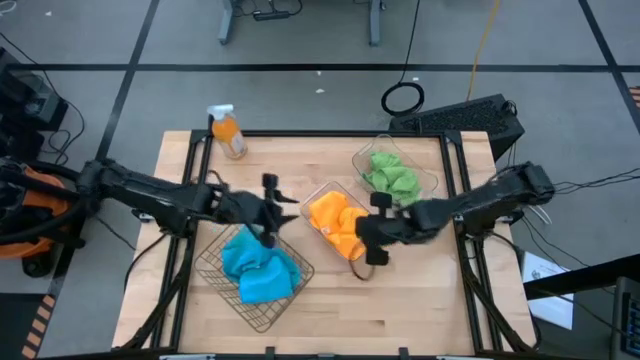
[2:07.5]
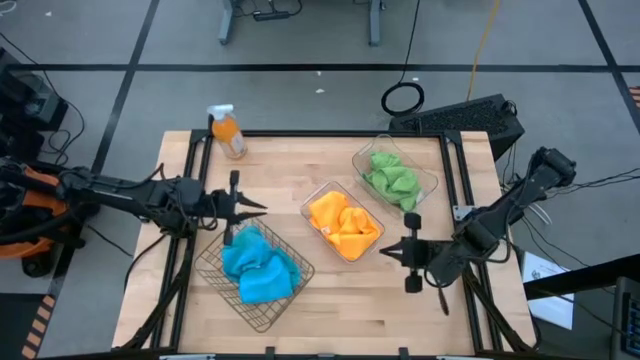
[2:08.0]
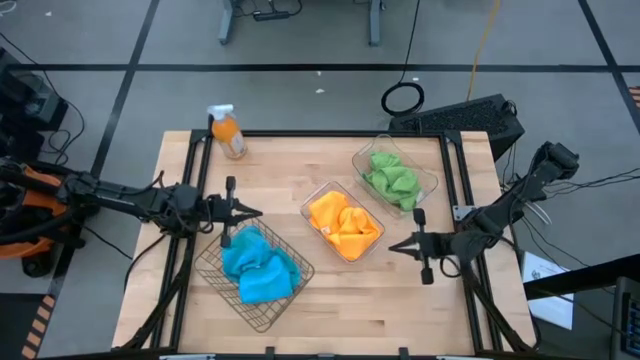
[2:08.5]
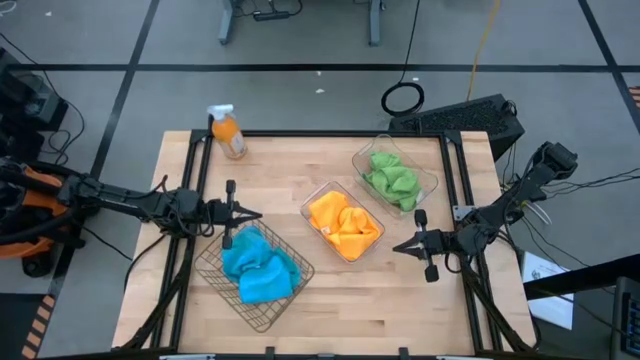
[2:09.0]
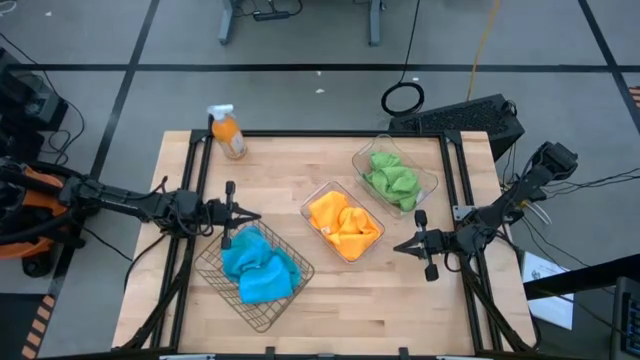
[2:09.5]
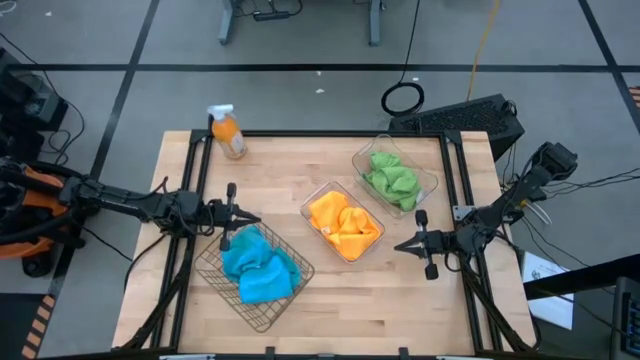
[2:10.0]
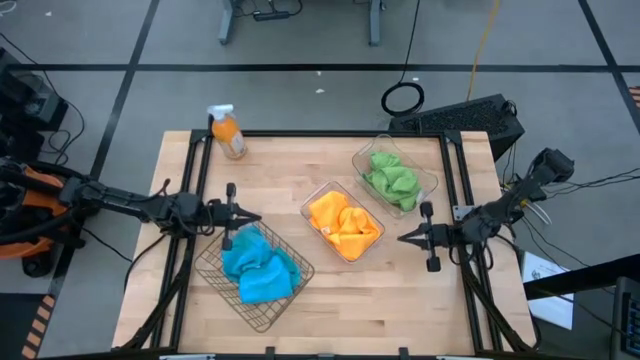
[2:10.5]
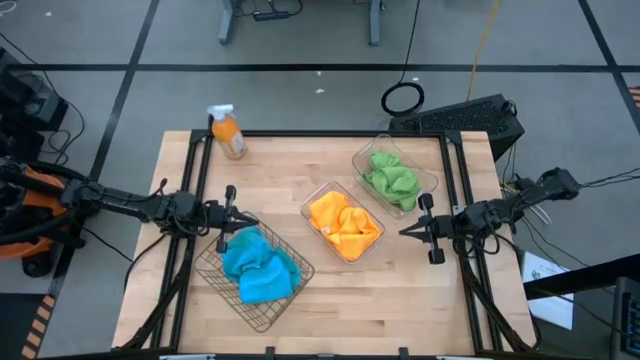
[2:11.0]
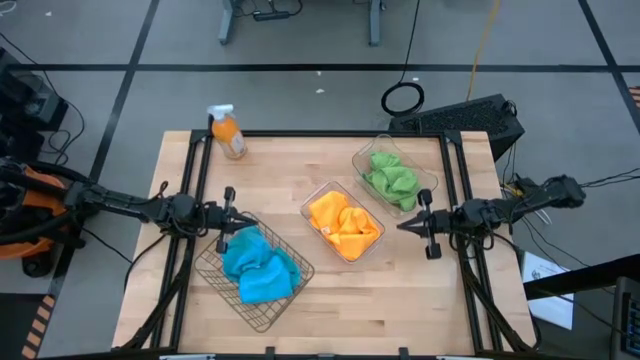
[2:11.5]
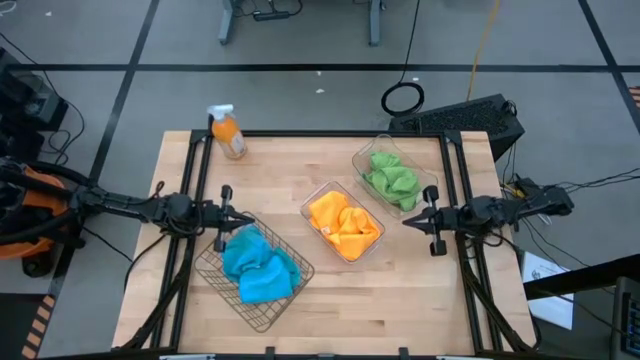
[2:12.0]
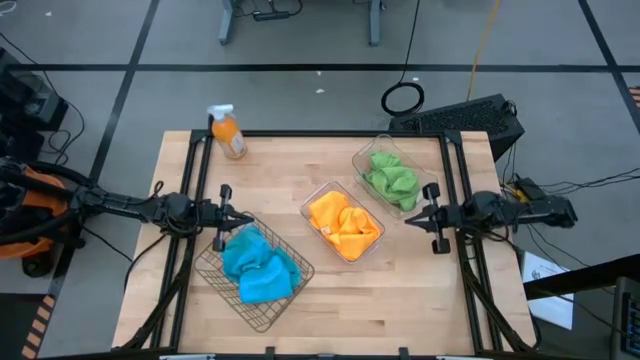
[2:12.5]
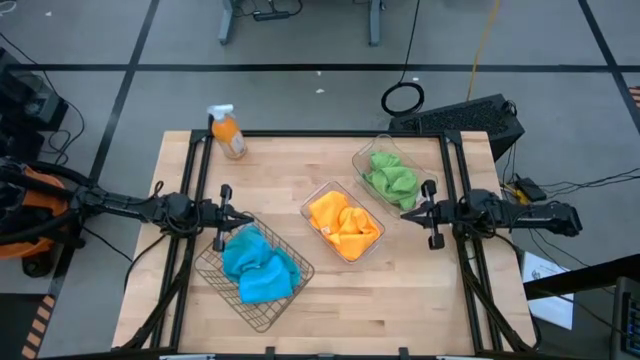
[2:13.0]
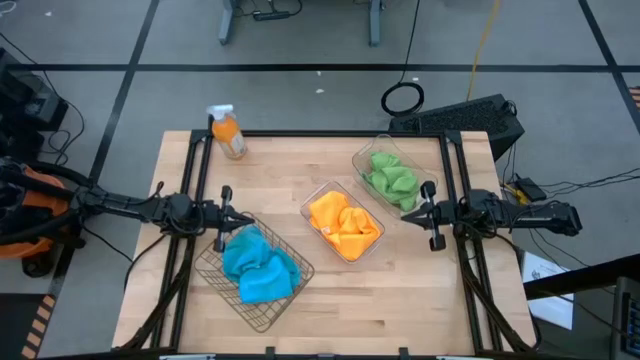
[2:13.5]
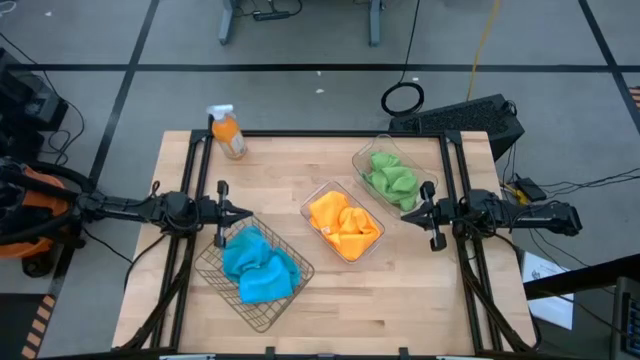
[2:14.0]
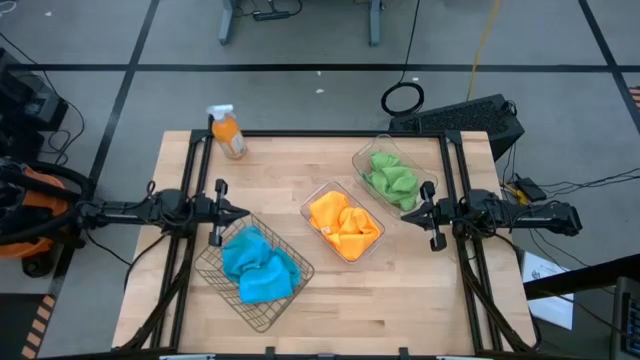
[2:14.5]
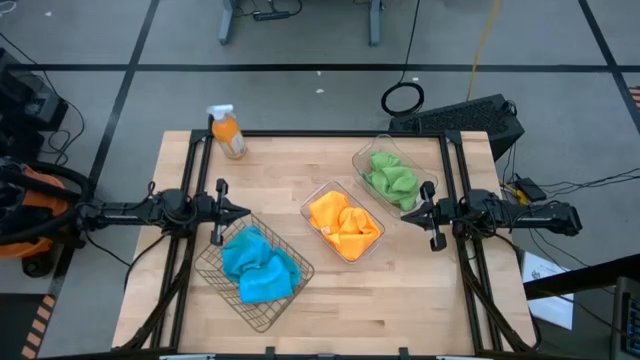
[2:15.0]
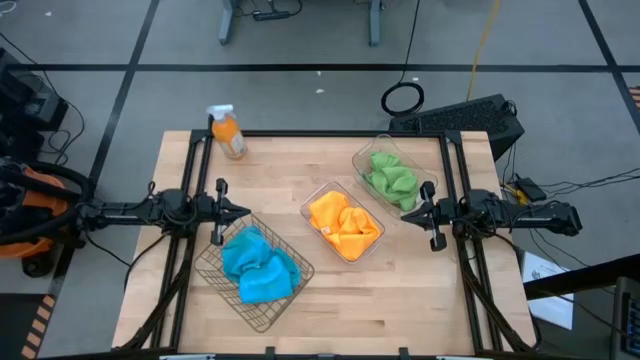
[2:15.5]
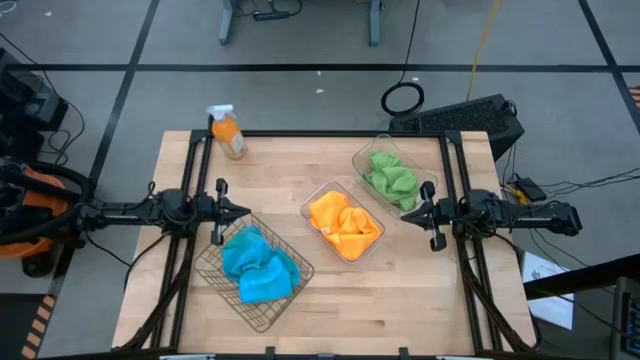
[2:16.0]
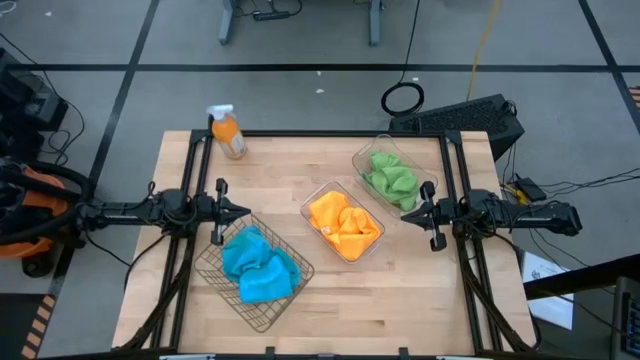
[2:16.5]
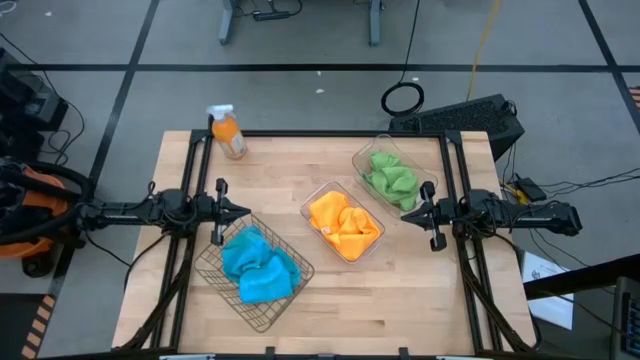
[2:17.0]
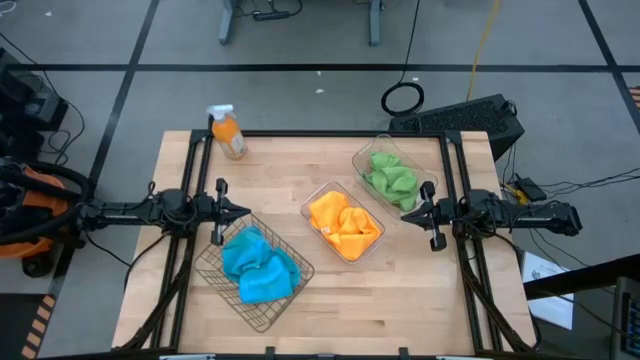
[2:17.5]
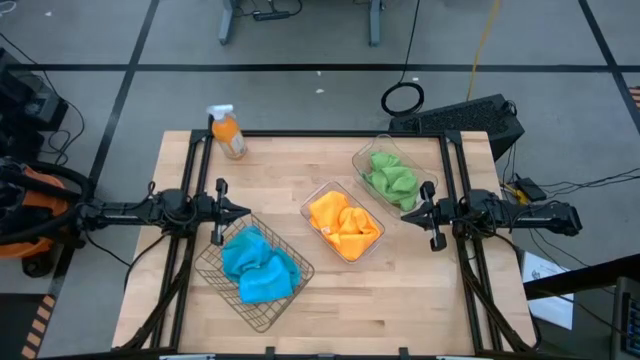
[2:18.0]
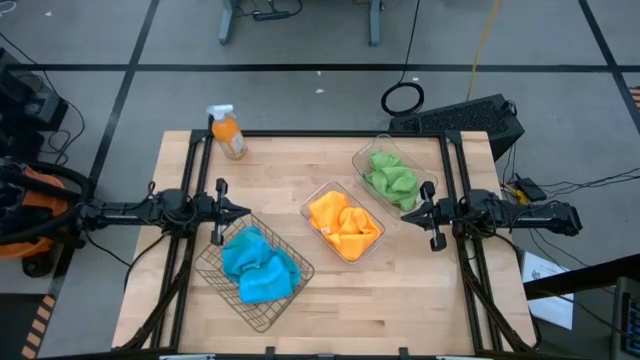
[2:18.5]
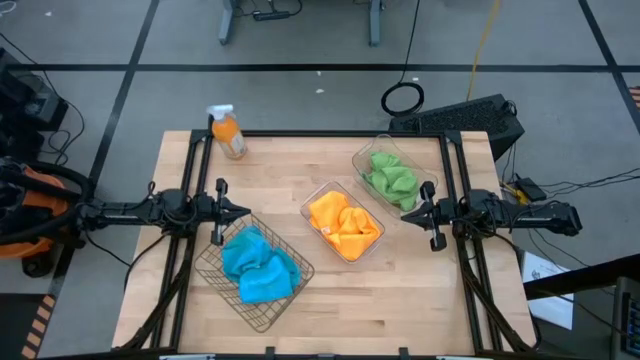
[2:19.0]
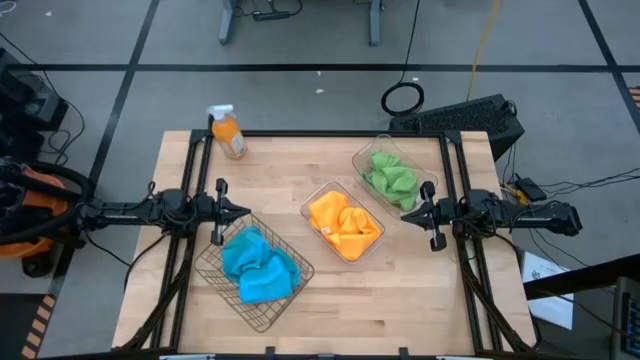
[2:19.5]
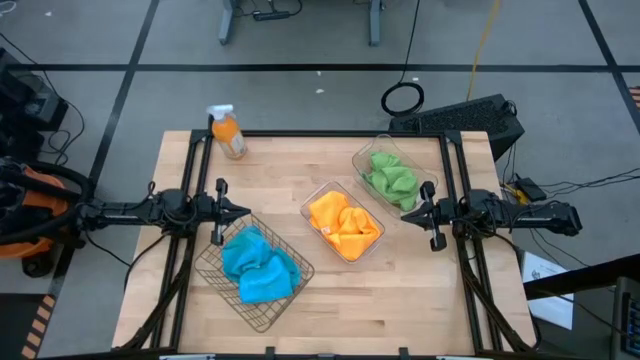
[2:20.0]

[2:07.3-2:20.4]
Task: Sort microfiber towel by color & place in baskets
Return To Home Position
